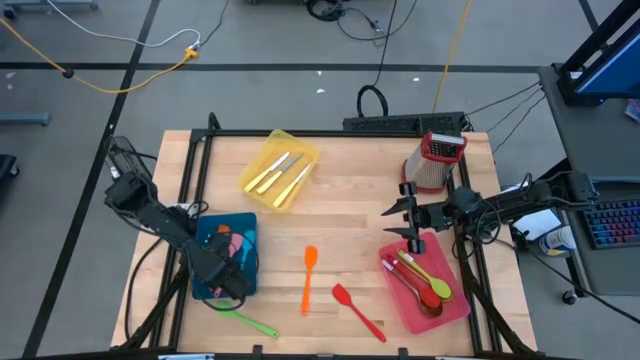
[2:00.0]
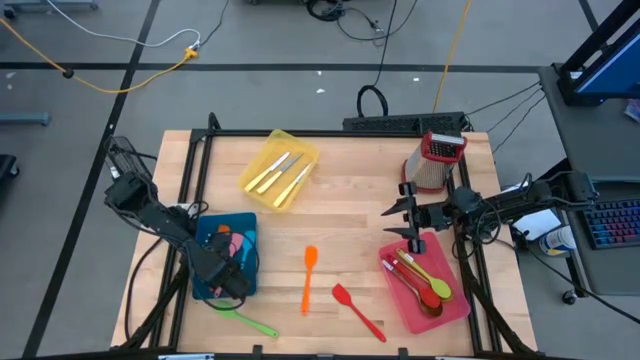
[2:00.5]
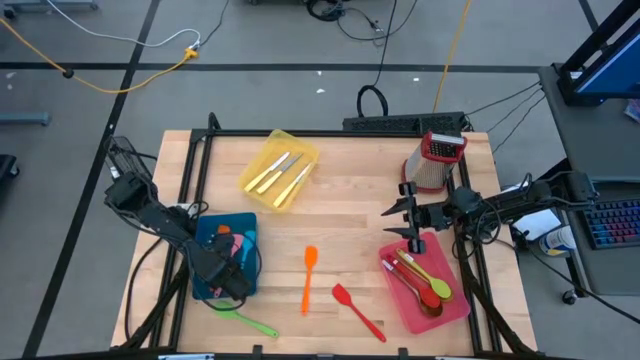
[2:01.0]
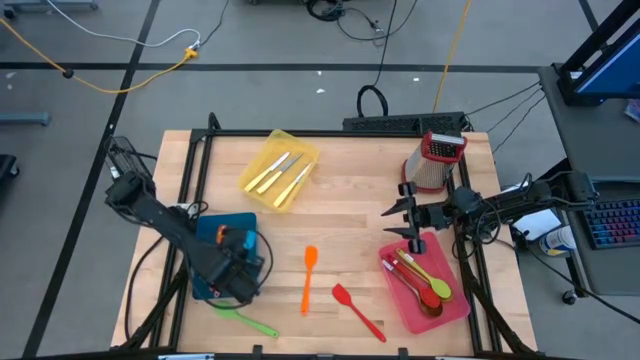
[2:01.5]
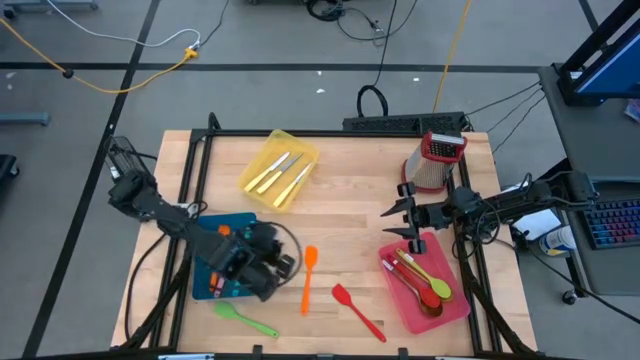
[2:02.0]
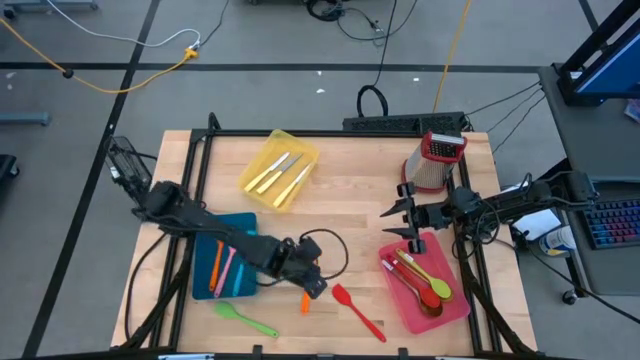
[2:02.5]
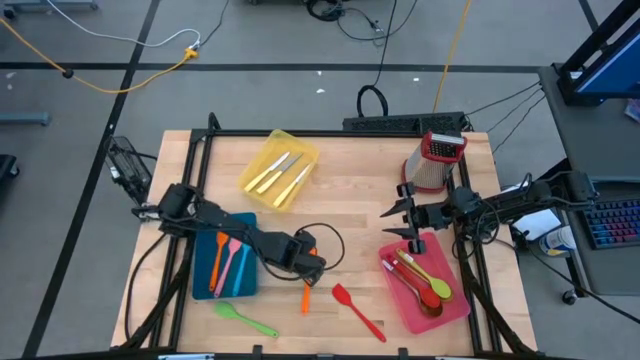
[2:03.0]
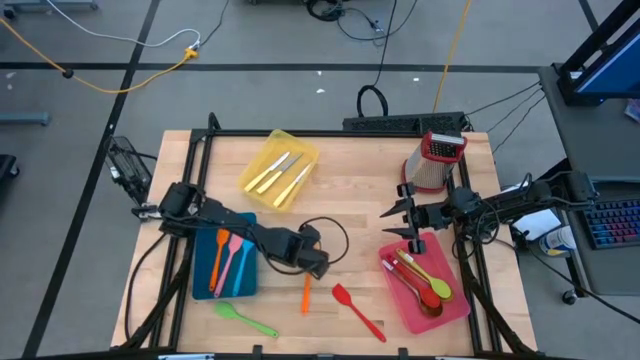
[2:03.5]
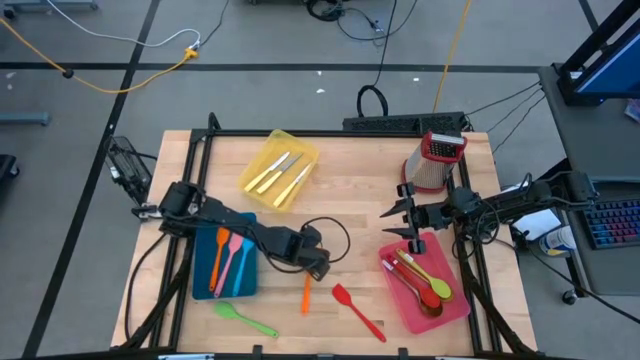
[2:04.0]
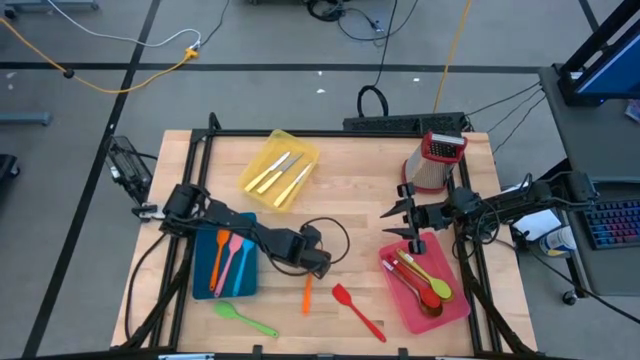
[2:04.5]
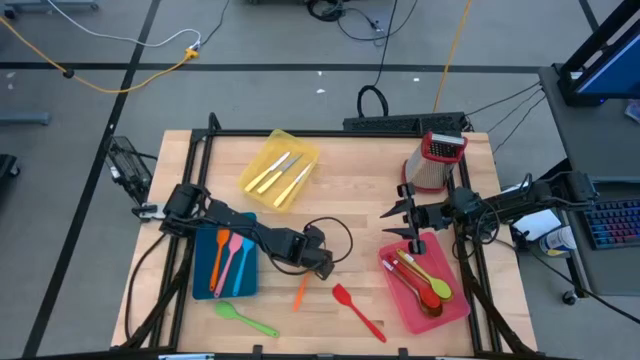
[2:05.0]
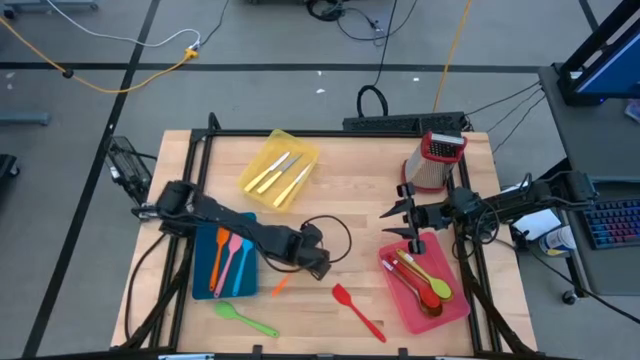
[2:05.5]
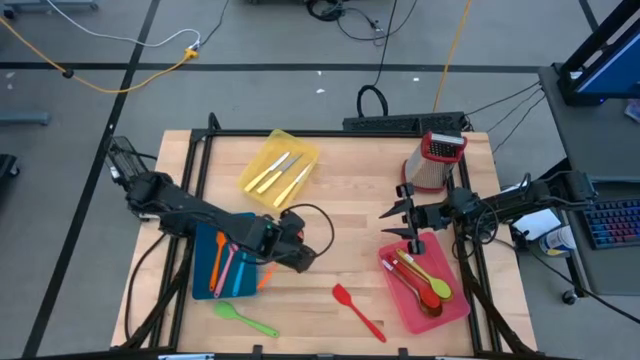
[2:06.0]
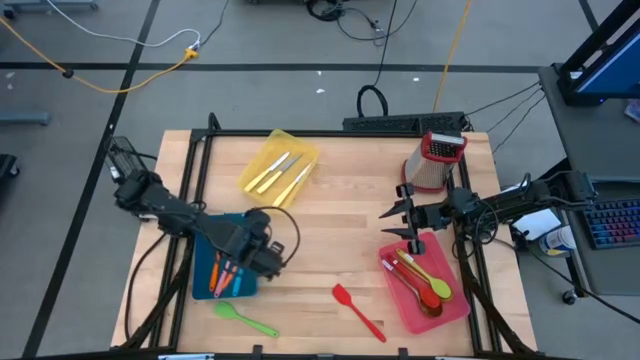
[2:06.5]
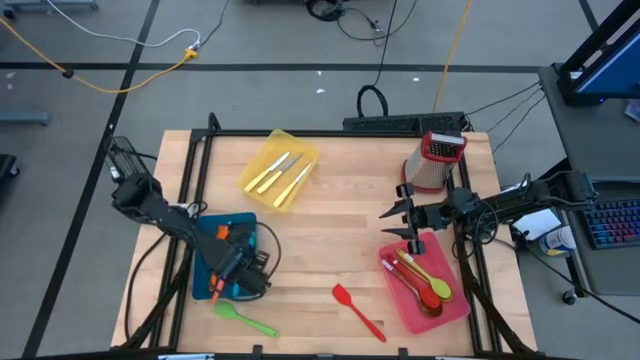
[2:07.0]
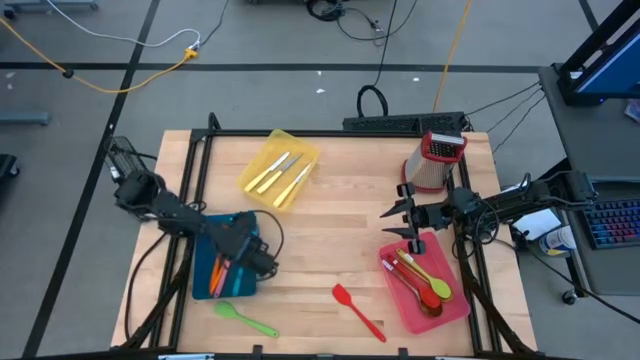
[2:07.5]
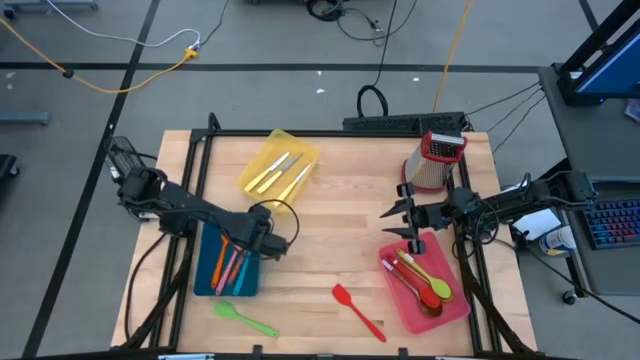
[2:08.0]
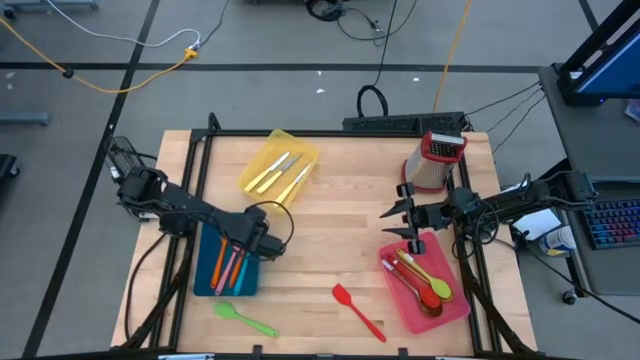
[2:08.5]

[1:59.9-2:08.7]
Task: Pick & Place Kitchen Items
Put the orange spatula into the blue bin

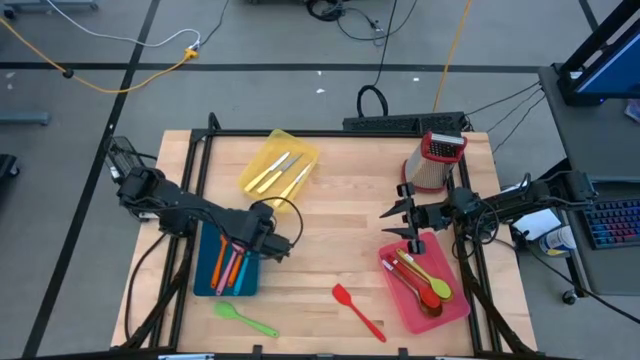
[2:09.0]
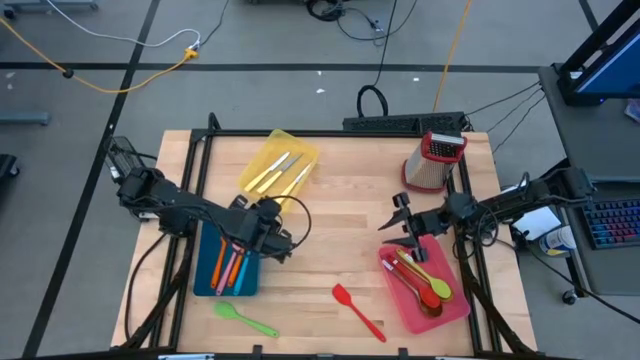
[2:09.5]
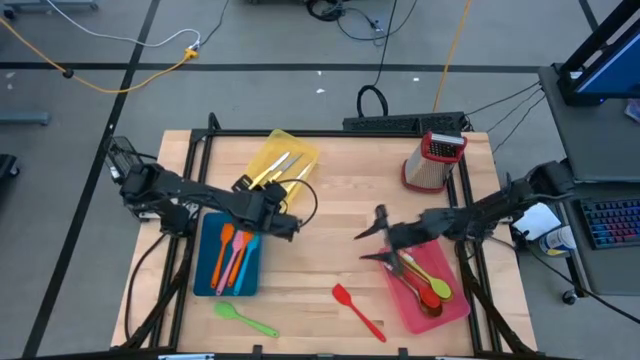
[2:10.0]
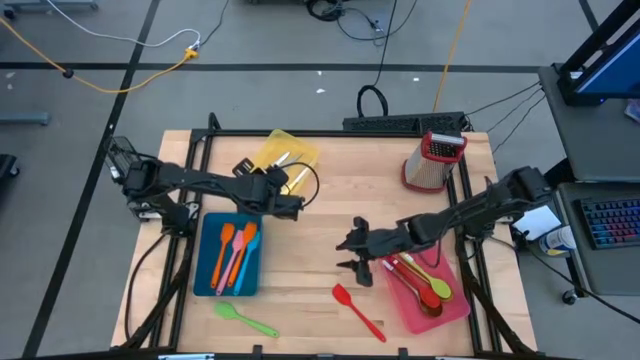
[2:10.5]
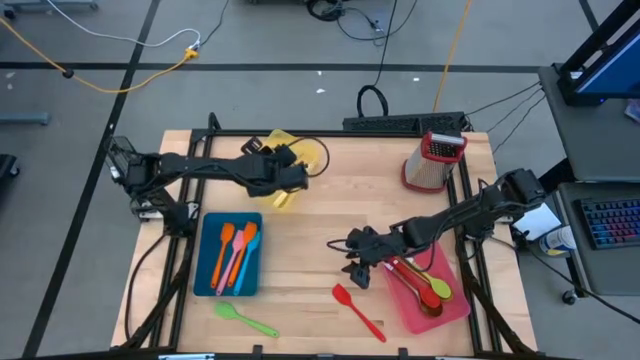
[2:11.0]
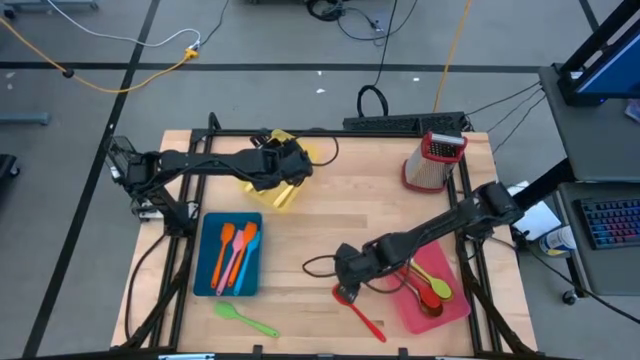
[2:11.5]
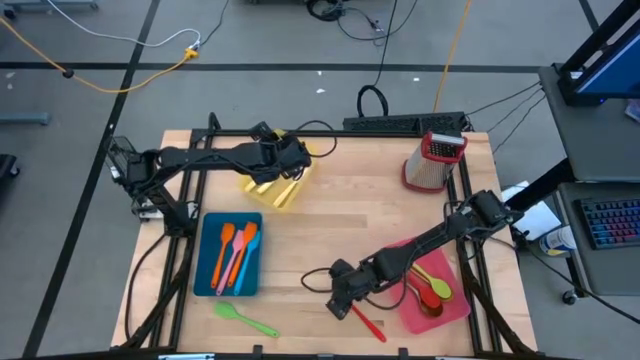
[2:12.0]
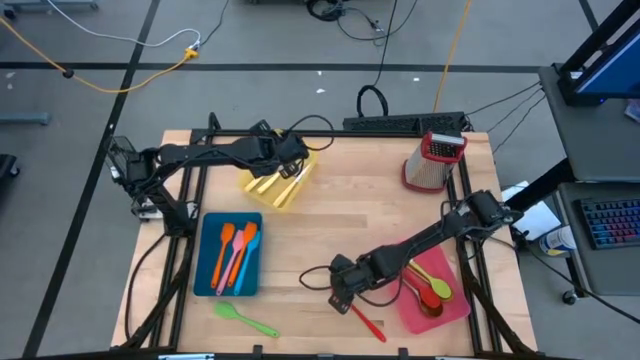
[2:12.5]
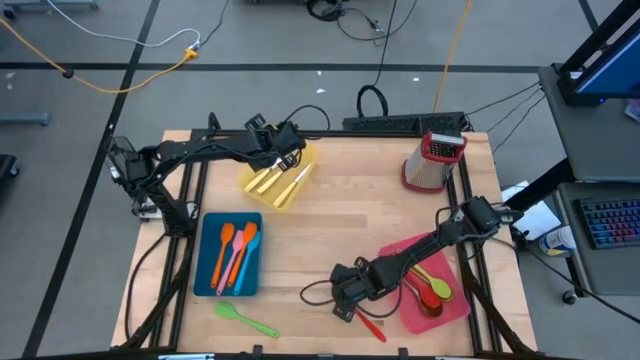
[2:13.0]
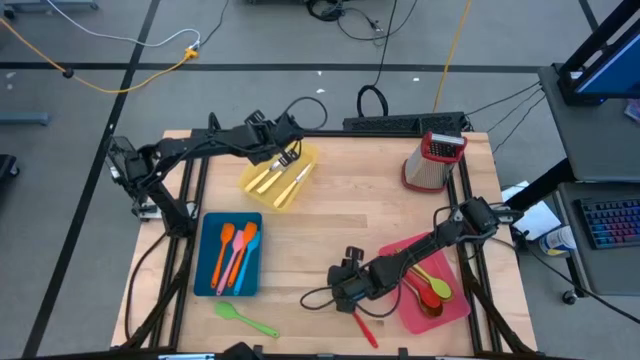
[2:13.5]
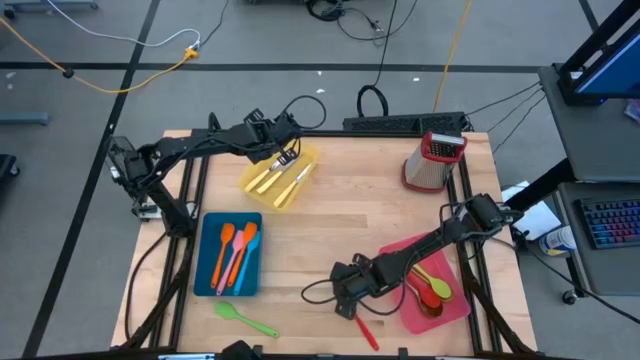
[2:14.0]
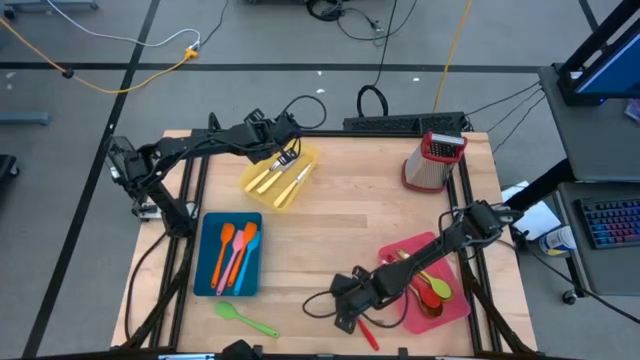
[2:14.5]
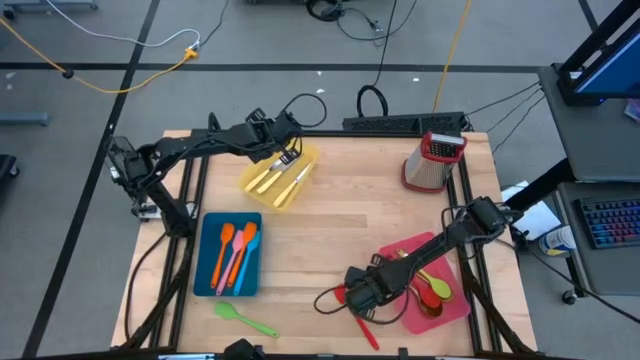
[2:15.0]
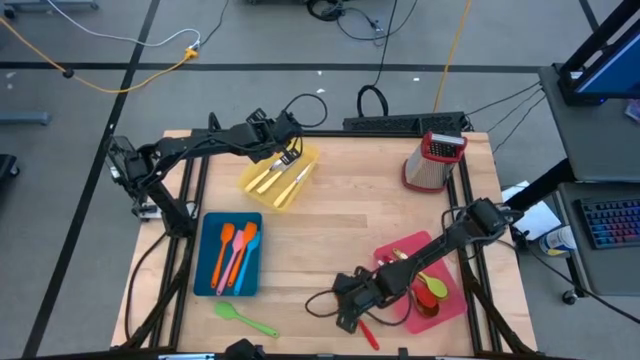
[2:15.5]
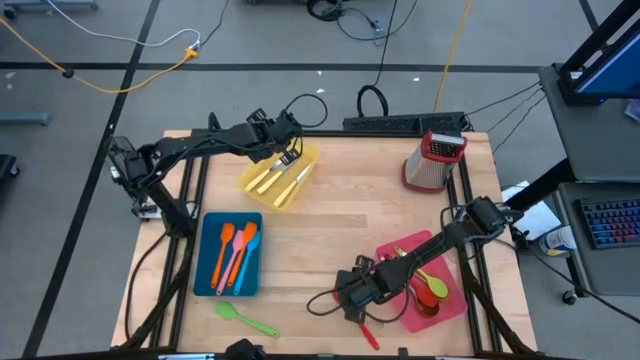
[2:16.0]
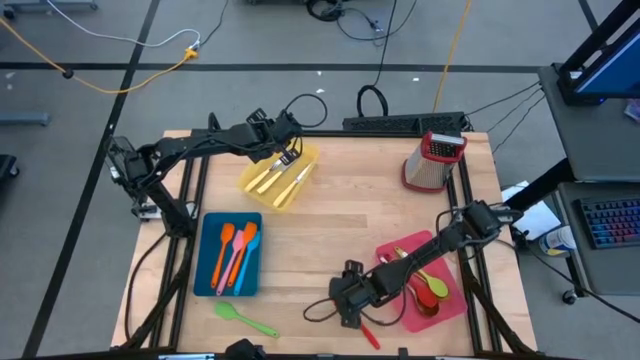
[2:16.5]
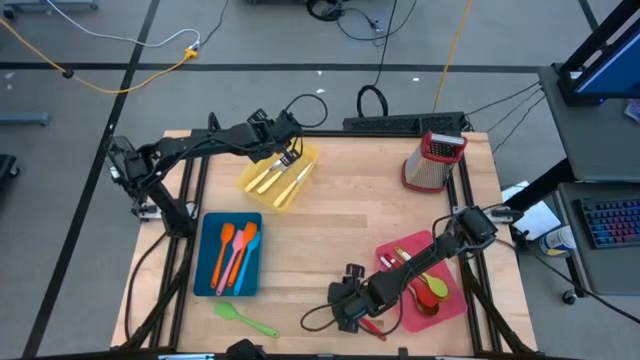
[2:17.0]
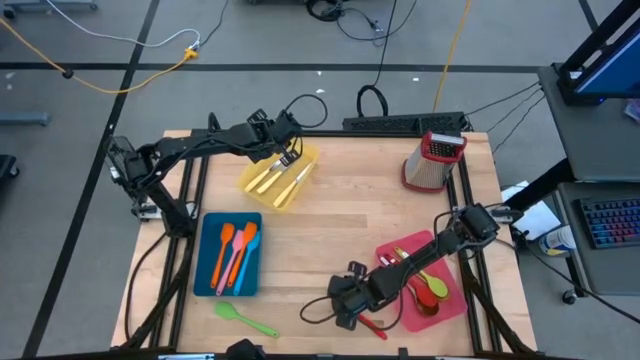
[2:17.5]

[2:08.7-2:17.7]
Put the red spatula into the blue bin
